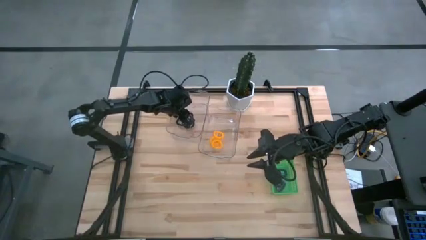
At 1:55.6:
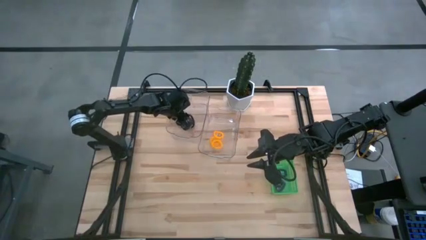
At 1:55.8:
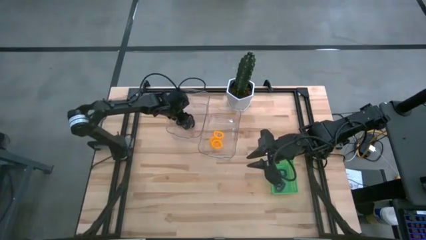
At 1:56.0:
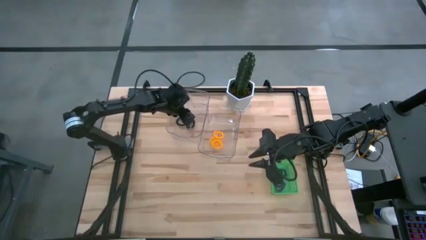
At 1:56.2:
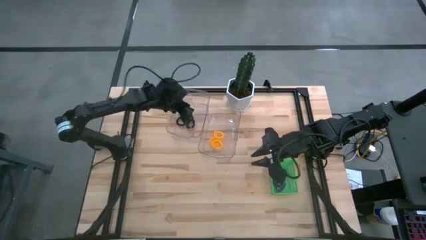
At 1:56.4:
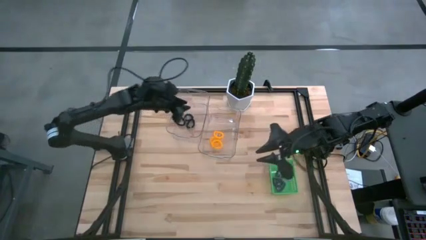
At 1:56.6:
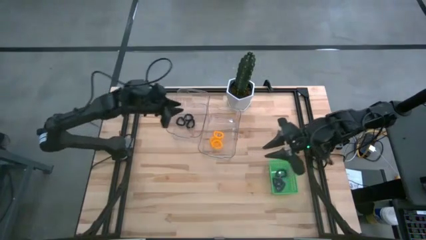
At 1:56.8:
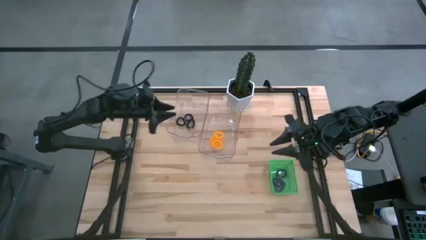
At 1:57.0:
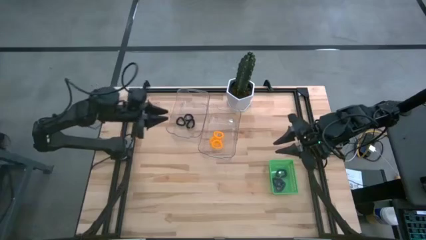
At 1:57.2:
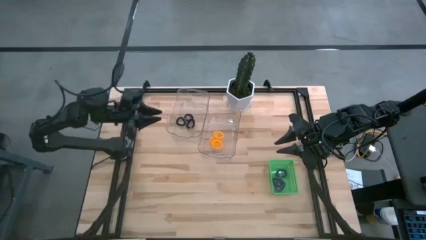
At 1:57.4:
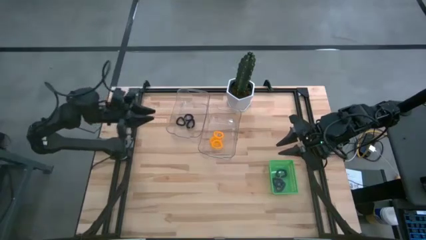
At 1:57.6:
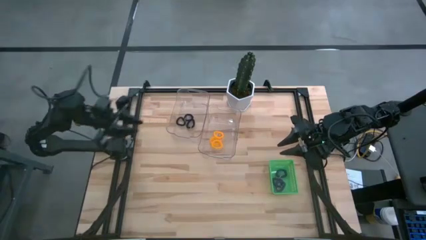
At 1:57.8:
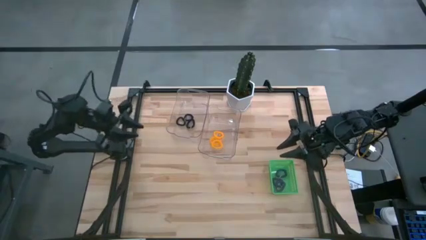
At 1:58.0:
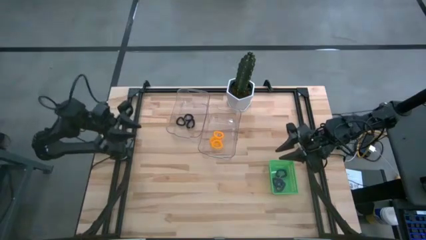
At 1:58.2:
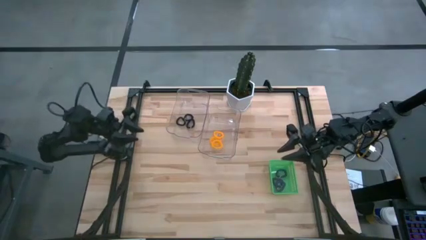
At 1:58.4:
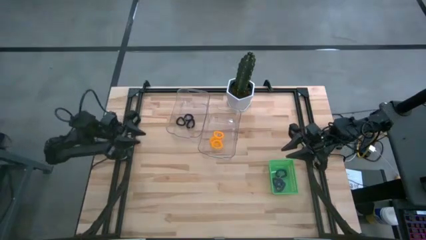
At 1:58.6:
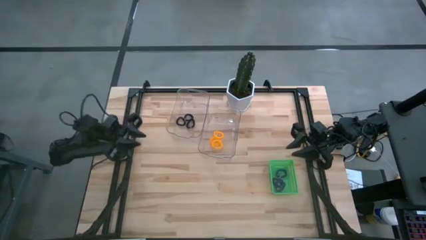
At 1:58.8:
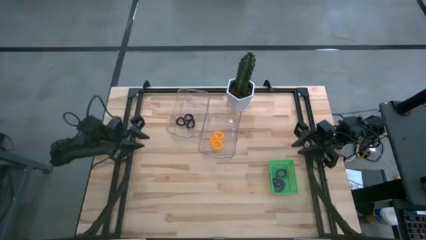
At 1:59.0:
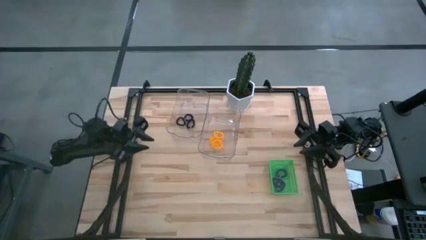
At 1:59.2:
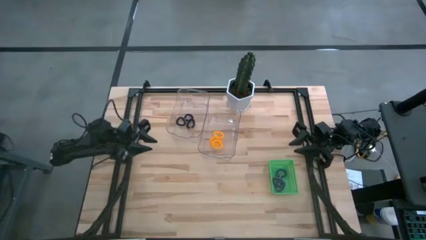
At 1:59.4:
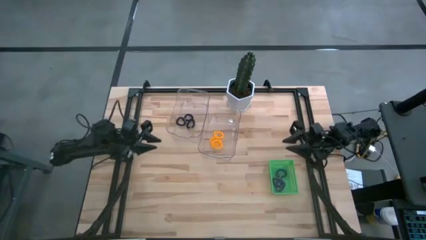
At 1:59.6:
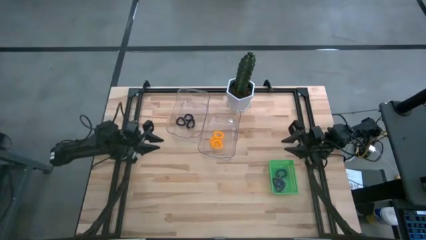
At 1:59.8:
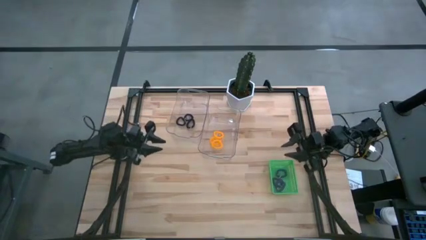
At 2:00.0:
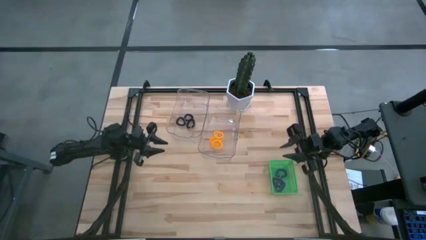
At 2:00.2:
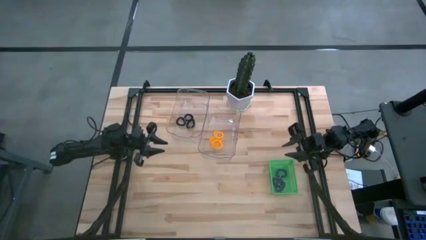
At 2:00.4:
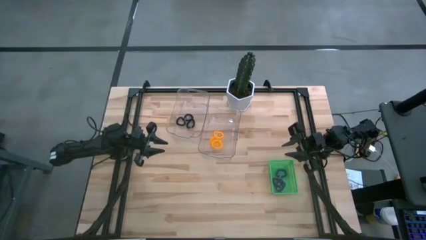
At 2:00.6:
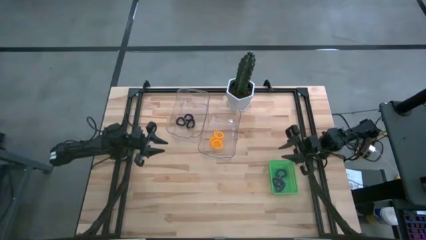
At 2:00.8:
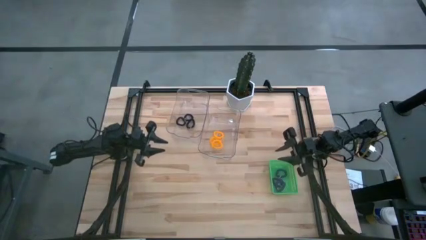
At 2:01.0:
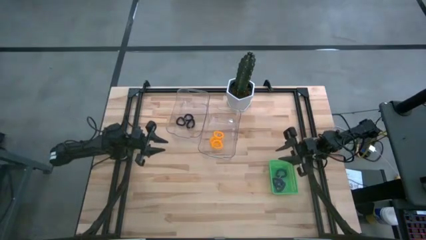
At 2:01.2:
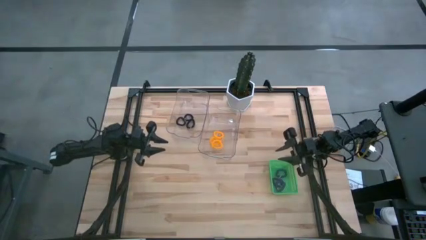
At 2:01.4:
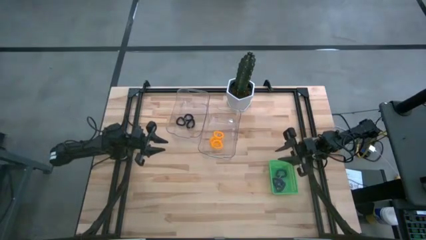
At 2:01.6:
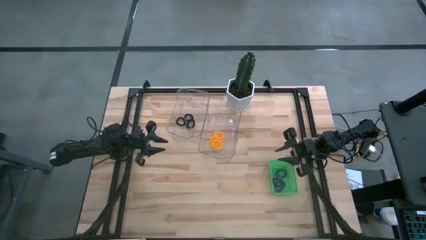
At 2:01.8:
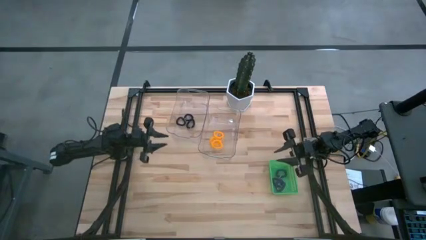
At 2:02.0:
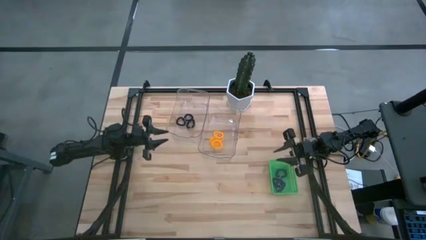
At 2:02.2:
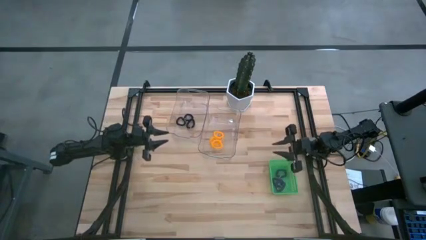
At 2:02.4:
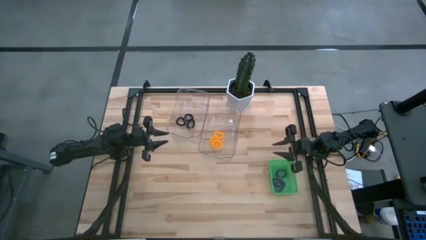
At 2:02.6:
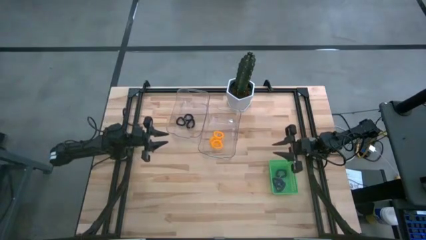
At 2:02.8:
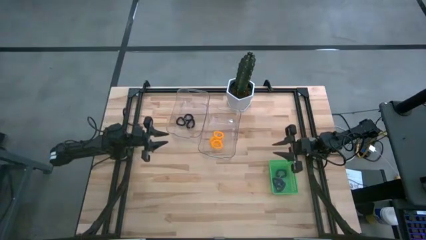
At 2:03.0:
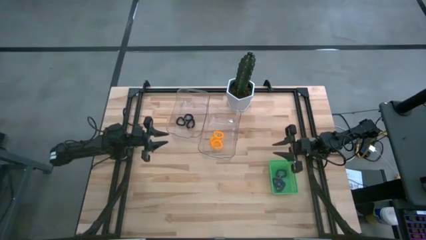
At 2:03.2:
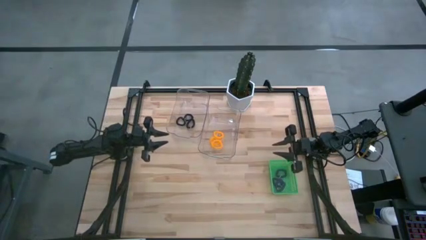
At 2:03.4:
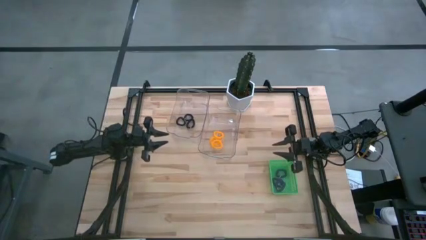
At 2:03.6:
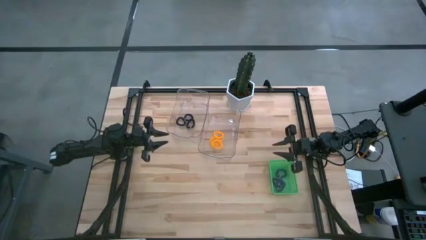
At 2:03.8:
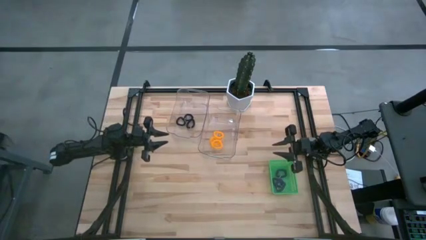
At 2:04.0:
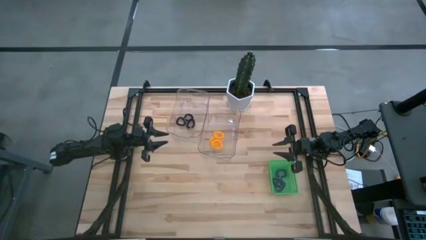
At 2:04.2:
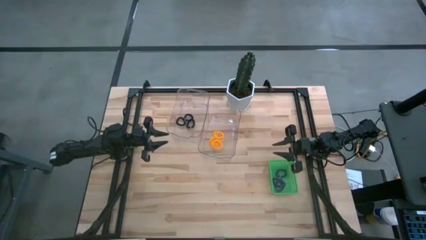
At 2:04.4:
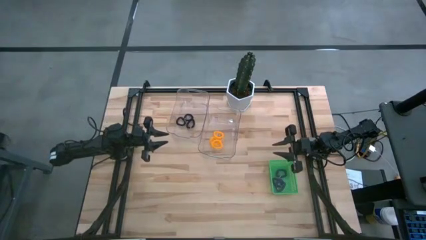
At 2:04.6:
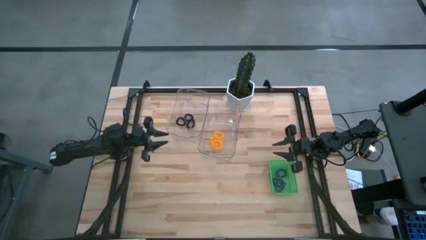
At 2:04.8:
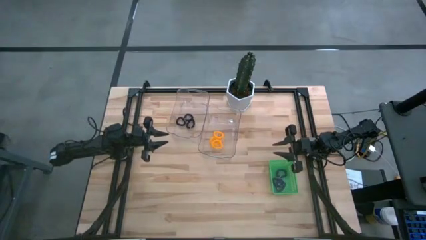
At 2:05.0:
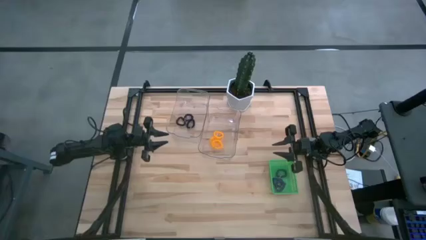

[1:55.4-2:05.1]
Task: Sort spring keychains
Return to Home Position

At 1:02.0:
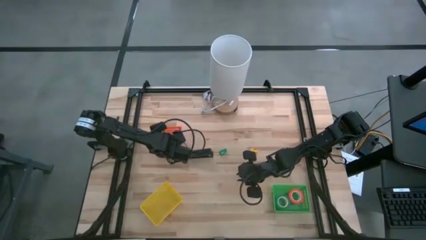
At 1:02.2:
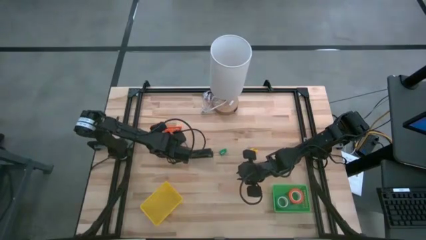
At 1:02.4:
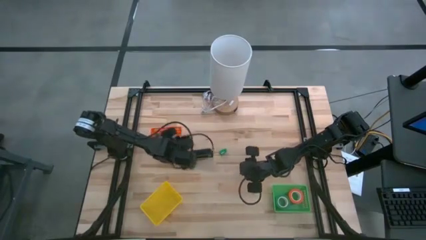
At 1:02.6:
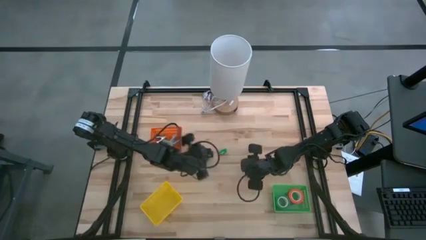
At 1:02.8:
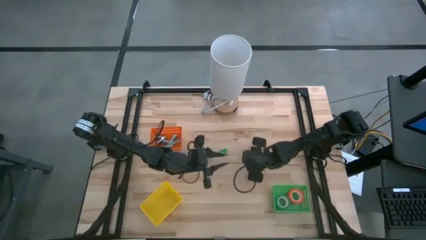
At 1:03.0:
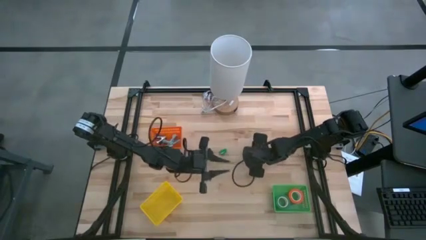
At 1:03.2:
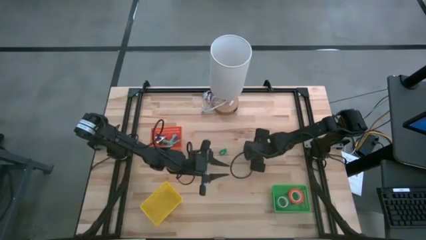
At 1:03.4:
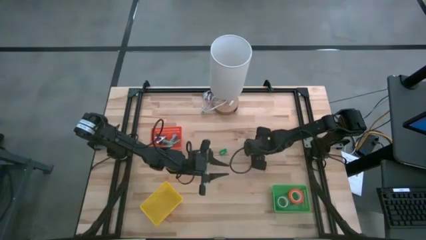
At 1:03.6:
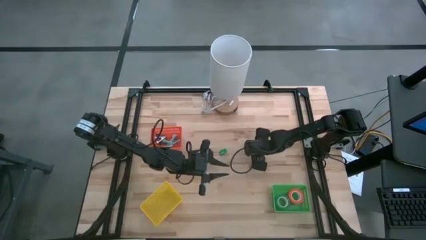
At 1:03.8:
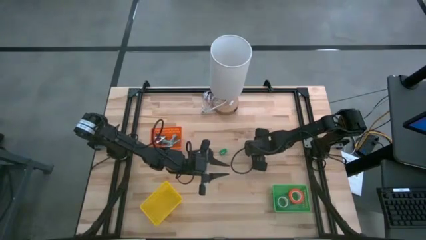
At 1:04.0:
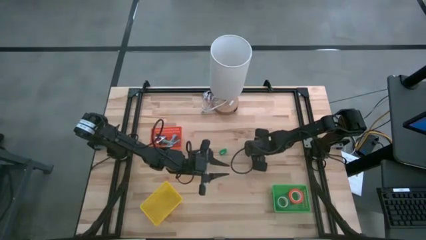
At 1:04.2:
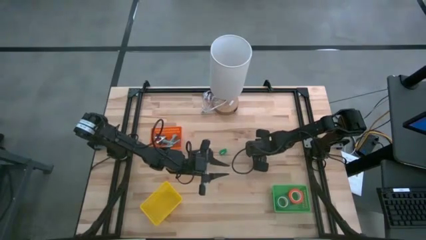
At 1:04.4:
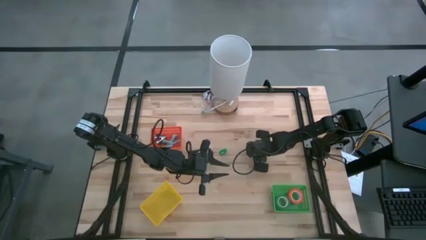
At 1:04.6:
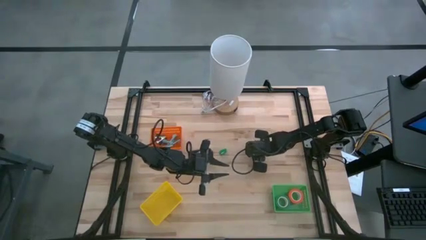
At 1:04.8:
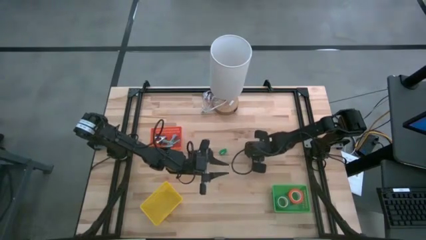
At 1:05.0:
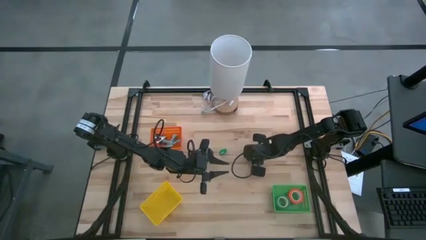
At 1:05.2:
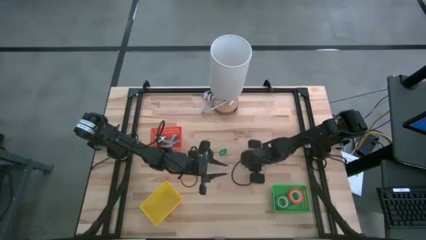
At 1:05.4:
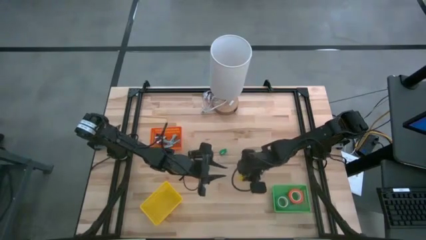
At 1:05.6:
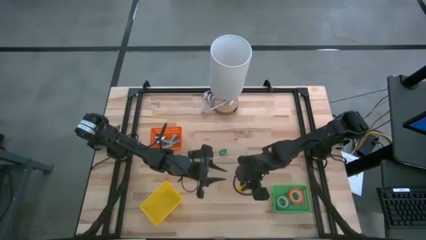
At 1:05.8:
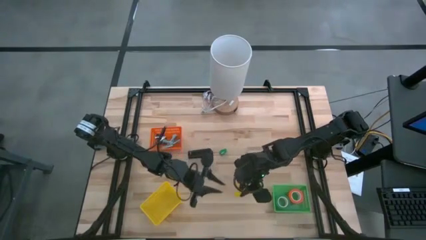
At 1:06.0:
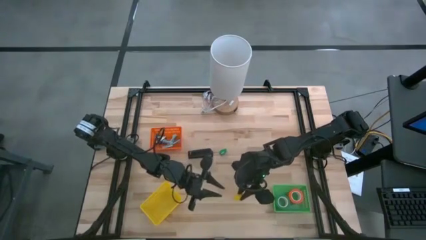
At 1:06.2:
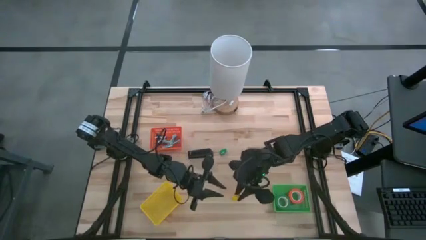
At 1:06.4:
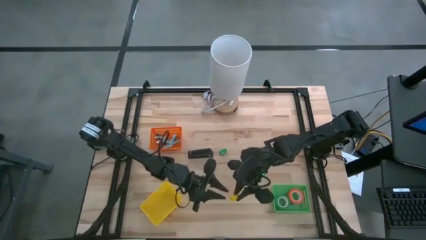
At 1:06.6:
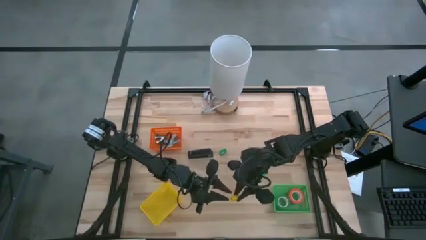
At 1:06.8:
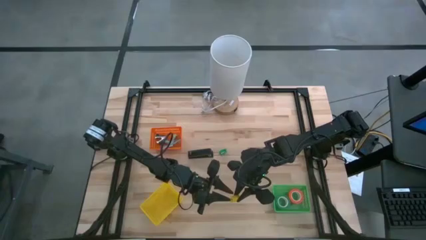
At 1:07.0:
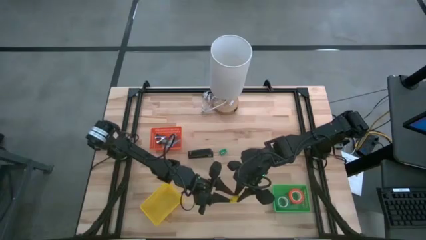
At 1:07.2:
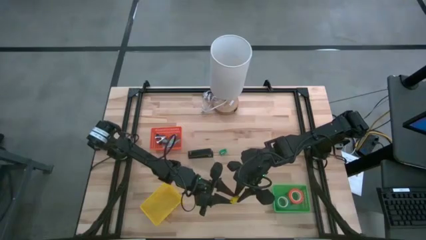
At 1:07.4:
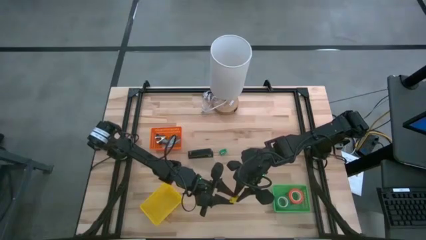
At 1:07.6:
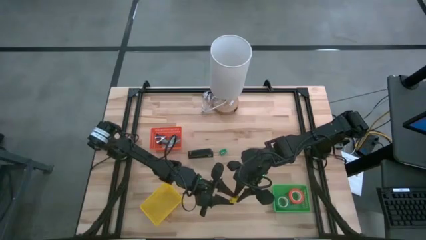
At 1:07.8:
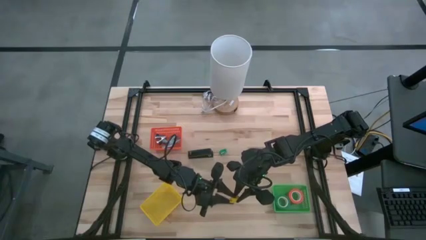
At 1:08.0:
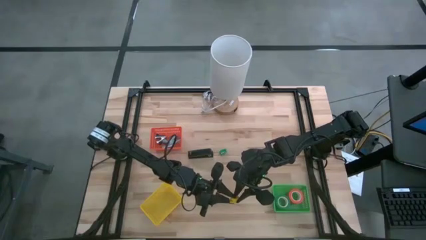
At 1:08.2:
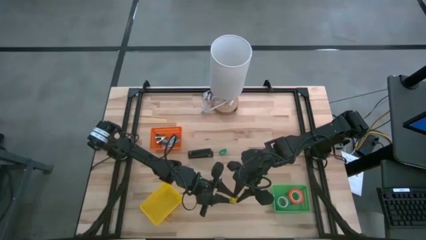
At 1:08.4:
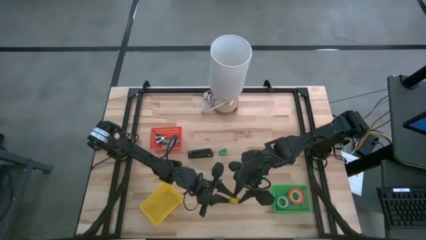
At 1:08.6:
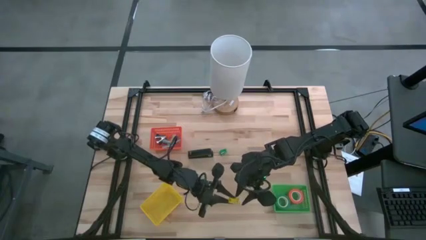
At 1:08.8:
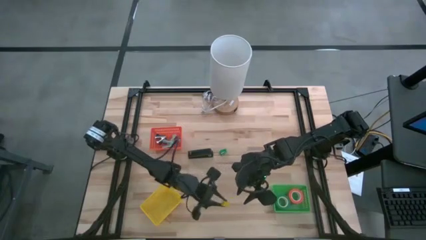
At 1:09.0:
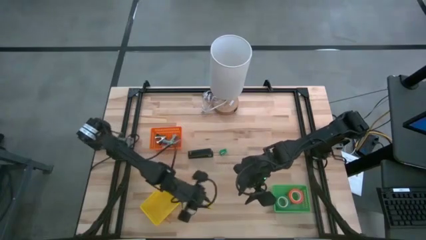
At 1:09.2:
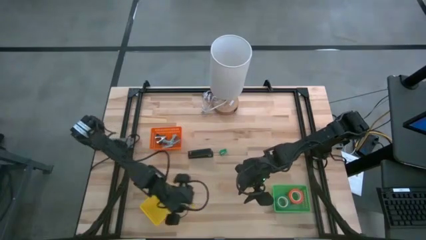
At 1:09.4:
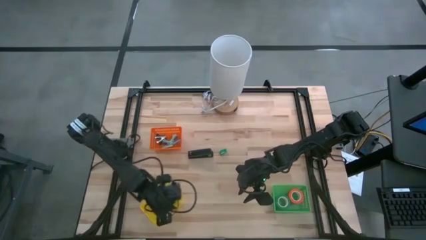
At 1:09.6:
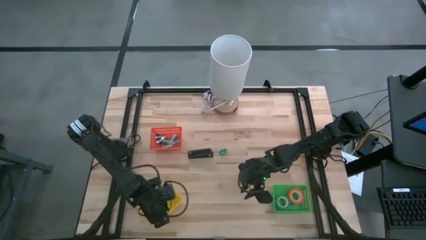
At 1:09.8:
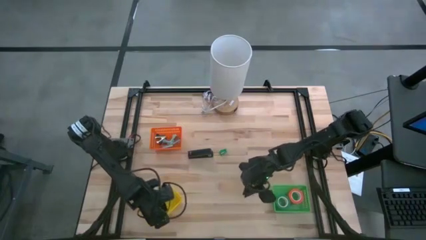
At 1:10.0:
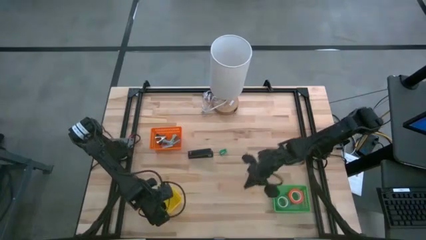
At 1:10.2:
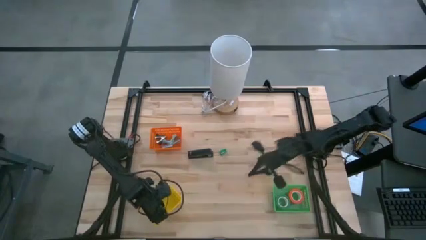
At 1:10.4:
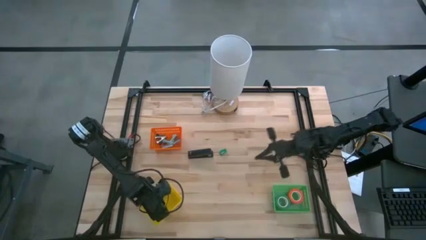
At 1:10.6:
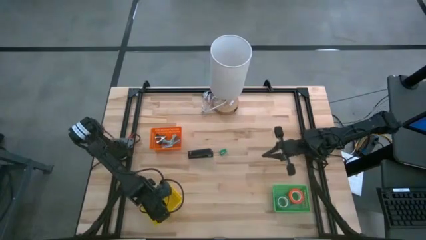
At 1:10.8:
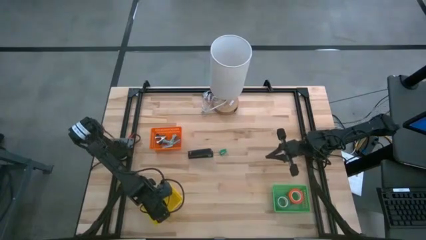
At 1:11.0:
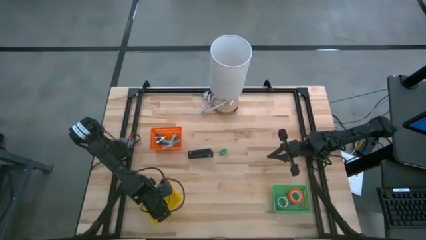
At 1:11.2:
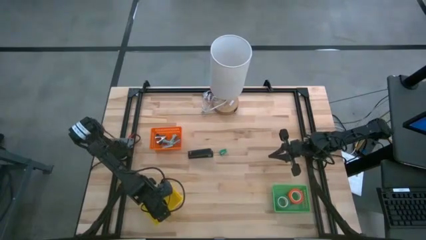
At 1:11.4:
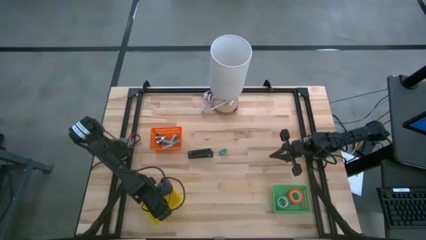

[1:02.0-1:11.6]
Task: Pick and place Stapler, Stapler remover, tape
Put the yellow stapler into the yellow bin
